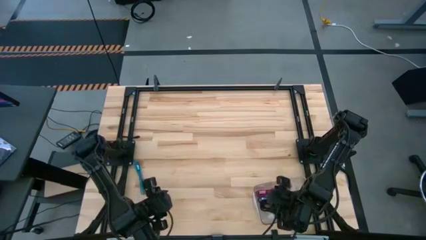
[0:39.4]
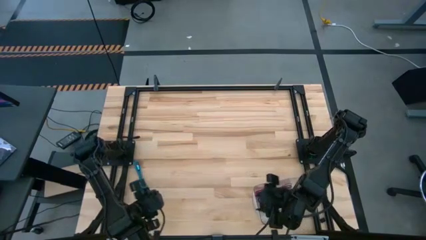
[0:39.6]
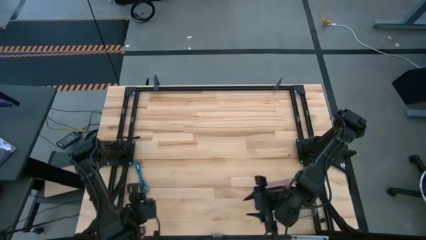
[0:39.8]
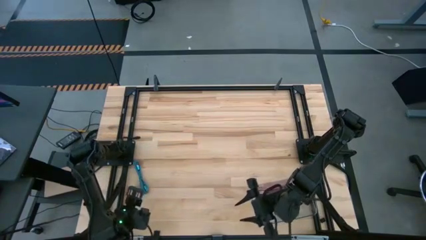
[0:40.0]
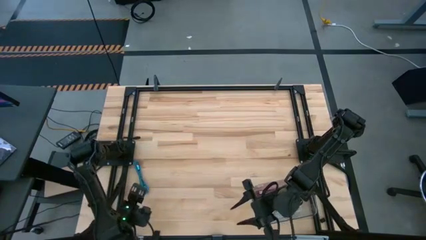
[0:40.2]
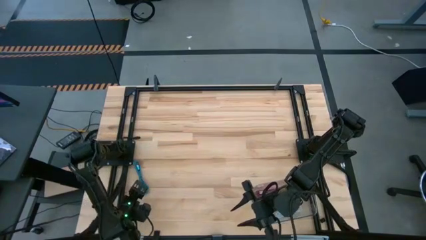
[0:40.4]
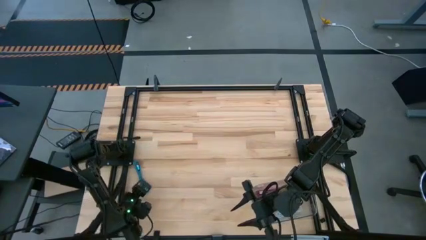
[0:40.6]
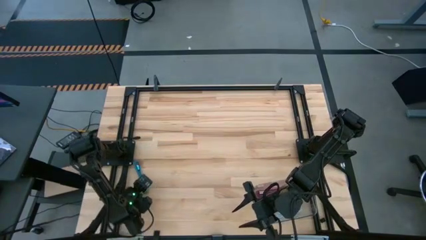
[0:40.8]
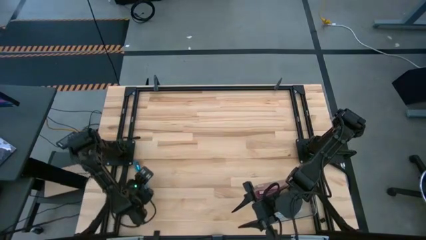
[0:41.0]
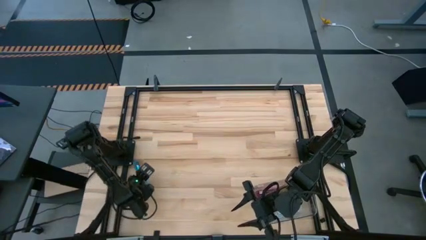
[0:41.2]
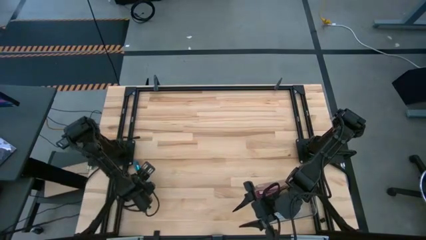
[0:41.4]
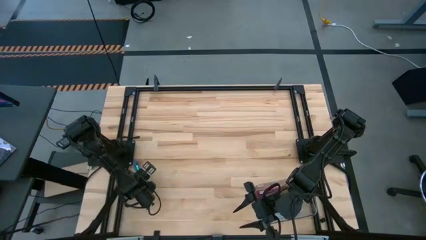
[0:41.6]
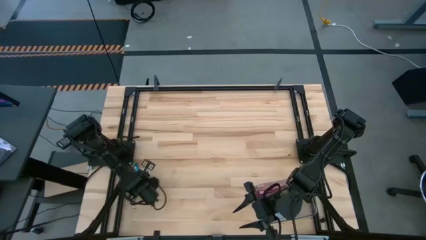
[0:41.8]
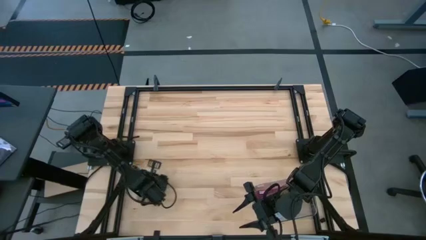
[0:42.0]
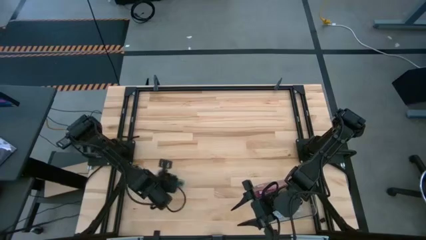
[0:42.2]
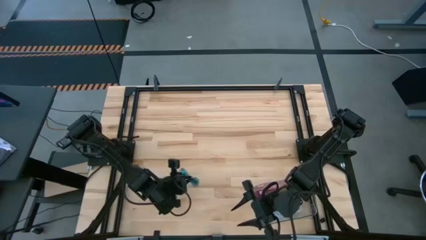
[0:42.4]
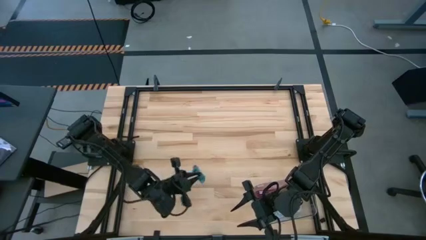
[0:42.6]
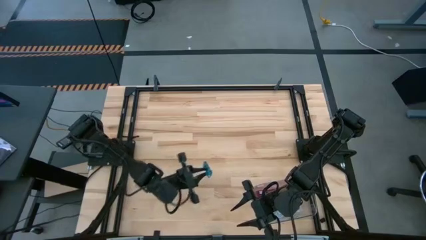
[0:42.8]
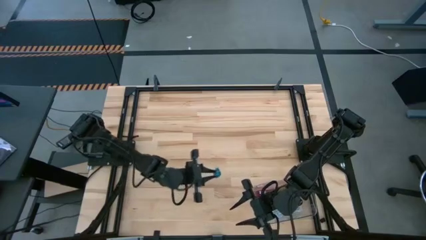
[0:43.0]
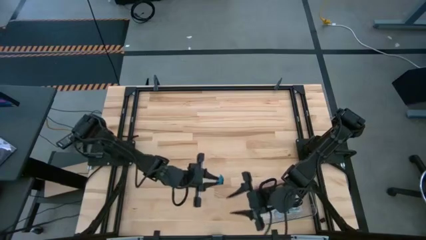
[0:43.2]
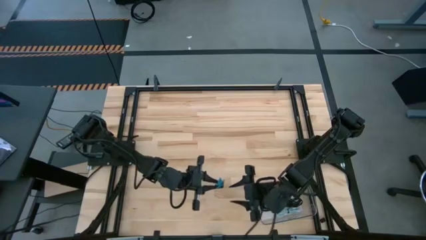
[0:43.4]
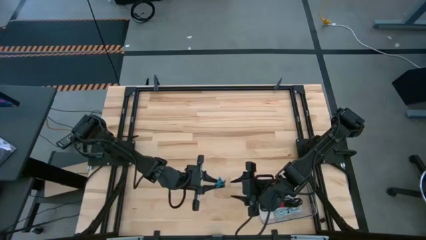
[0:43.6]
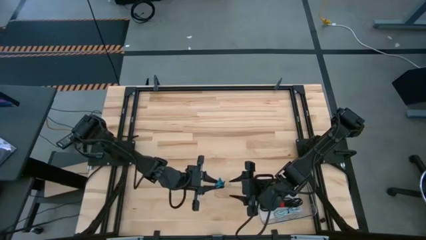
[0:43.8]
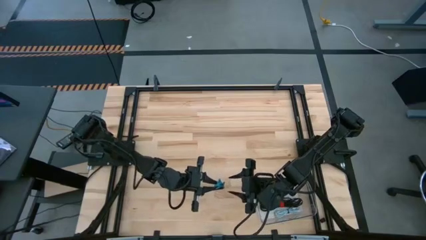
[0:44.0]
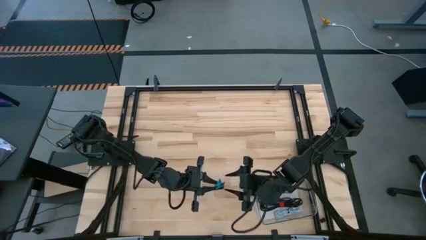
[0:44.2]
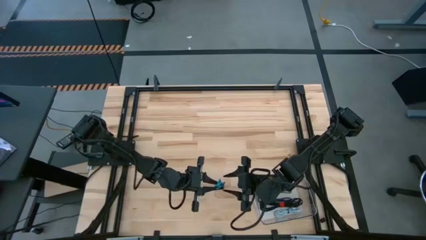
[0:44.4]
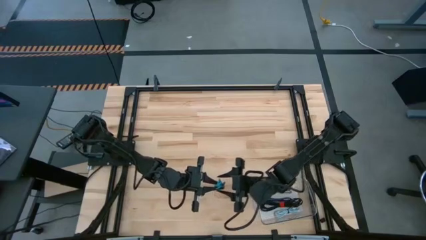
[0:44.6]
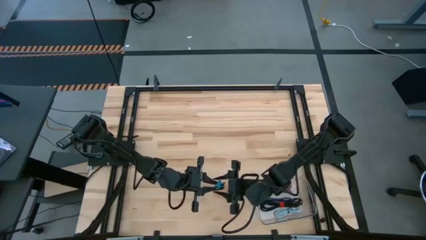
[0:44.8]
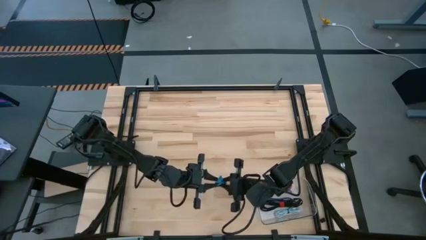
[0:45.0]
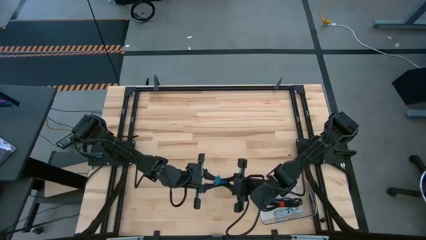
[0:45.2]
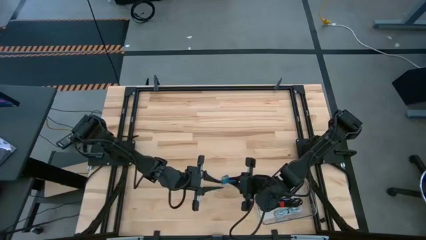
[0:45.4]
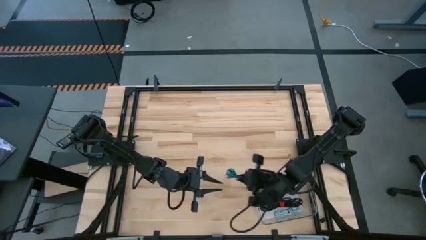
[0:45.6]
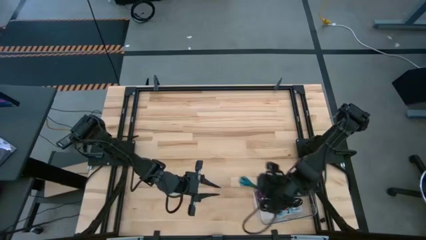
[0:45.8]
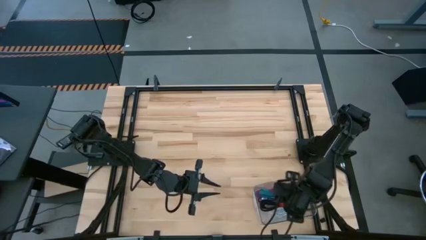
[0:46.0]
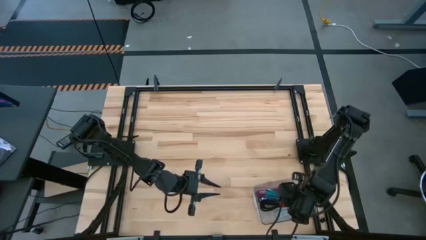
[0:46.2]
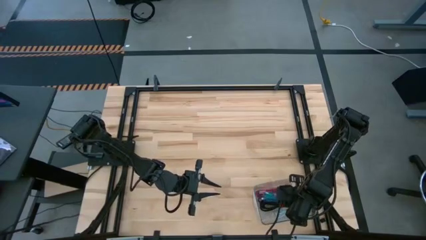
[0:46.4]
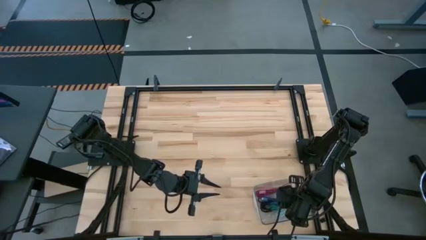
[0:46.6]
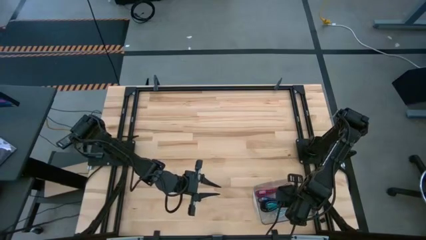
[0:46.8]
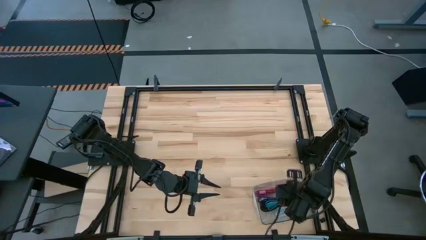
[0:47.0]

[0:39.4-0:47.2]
Task: Pick and place USB-C Cables
Put the blue USB cable into the transparent bin

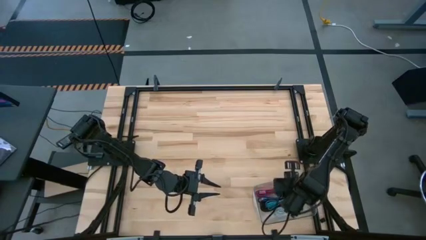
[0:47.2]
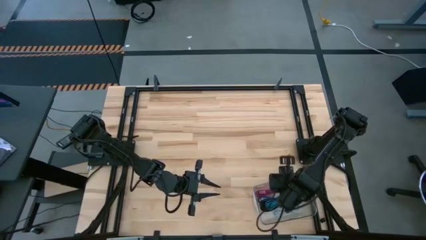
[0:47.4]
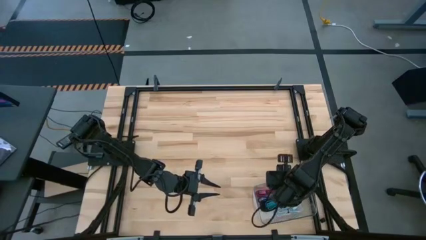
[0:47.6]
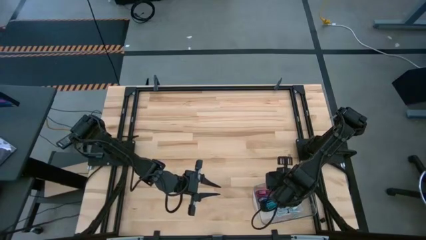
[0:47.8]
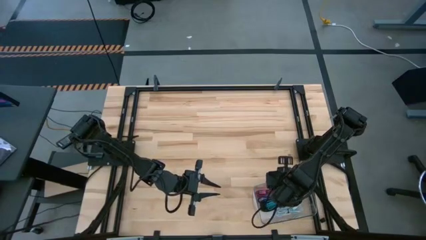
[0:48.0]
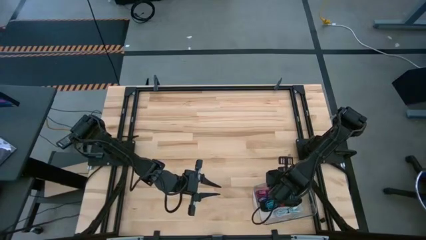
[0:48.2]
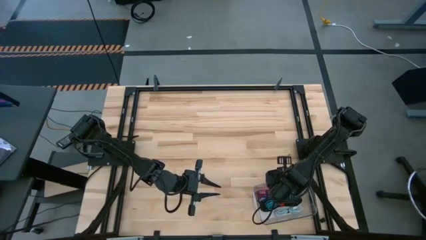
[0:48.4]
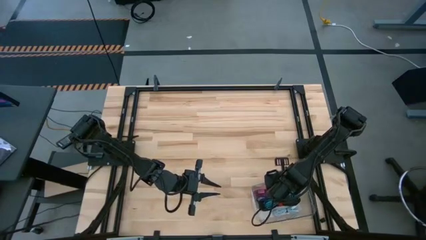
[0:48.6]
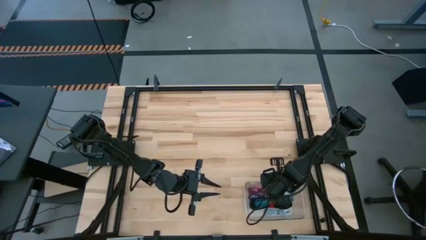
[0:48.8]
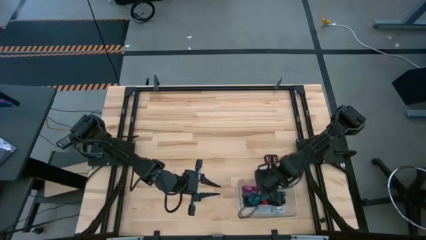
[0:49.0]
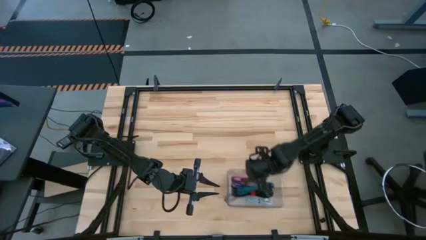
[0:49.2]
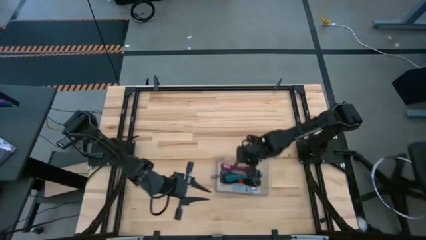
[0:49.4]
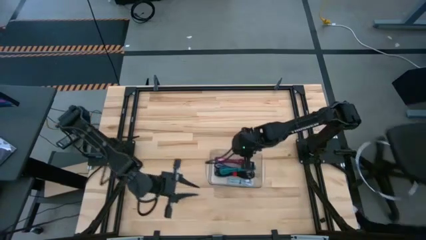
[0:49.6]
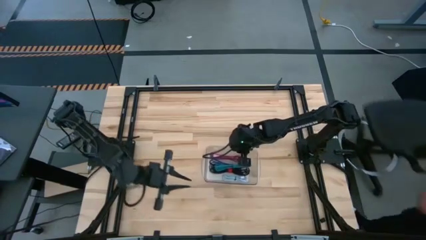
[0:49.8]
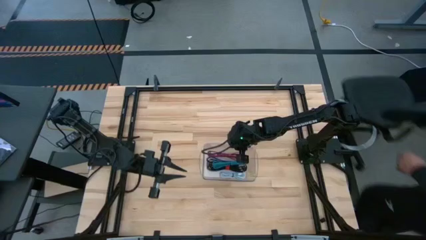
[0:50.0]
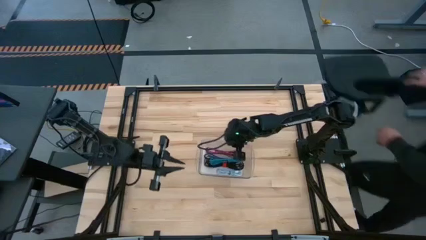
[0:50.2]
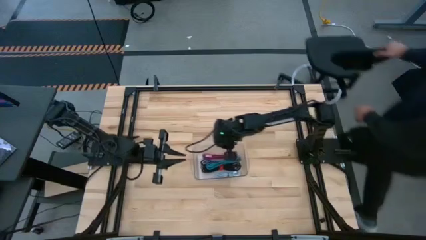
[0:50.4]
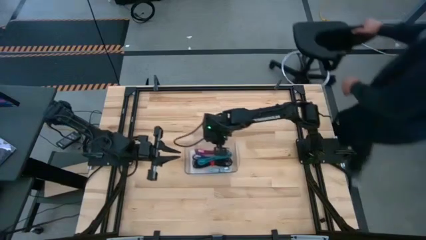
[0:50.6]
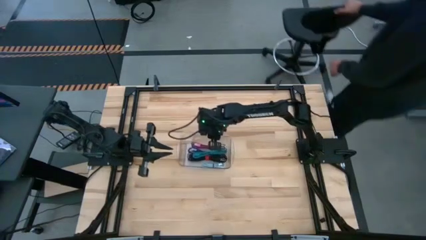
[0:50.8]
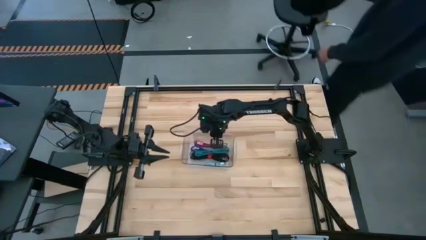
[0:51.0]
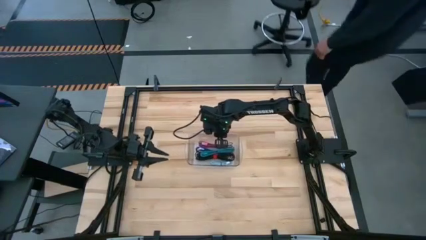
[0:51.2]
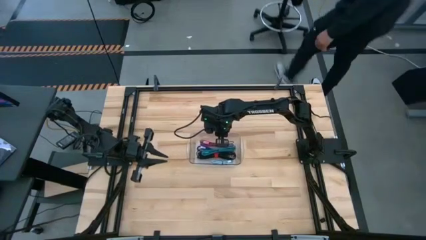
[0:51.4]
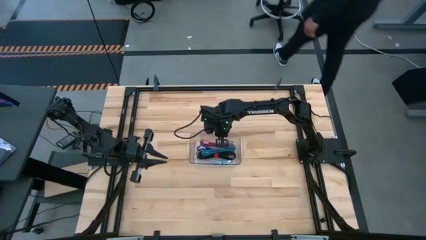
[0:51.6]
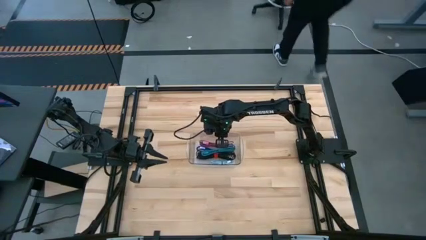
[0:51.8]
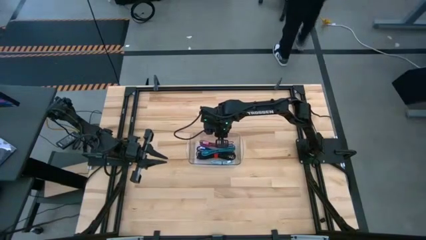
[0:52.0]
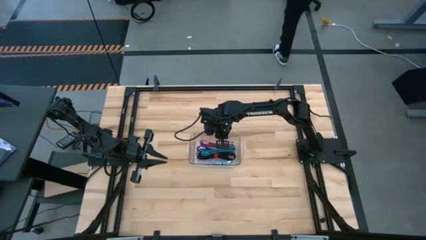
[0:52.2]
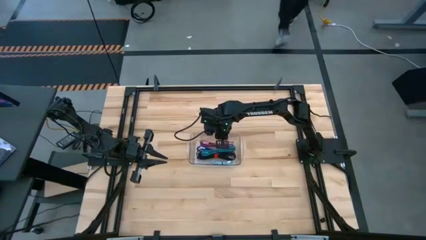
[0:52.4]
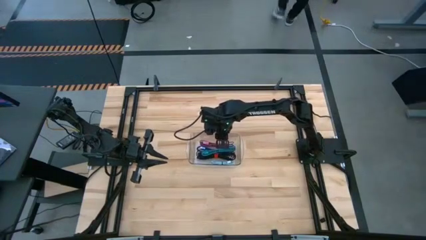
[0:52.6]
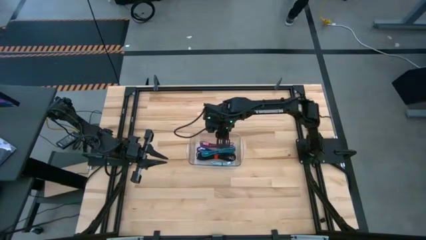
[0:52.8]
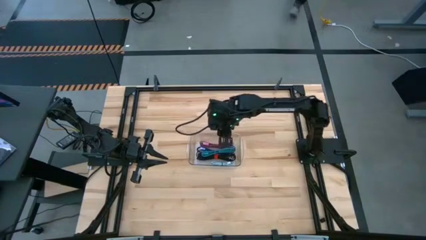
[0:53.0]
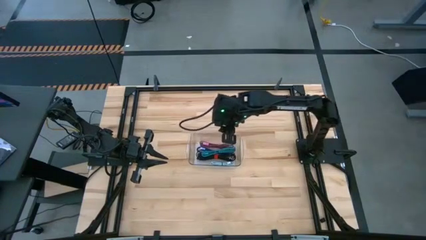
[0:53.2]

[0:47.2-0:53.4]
Move the transparent bin to the center of the table

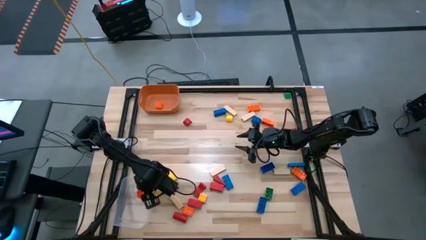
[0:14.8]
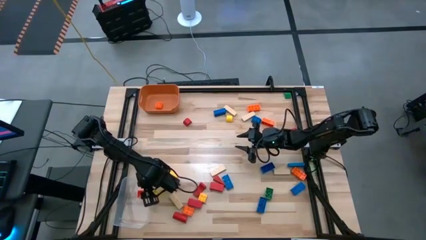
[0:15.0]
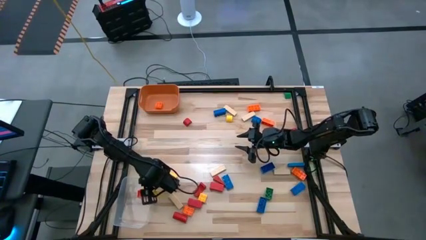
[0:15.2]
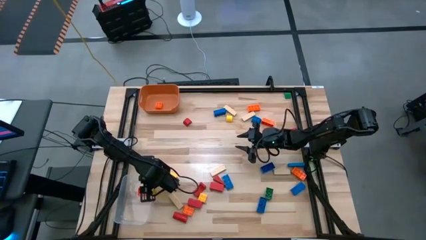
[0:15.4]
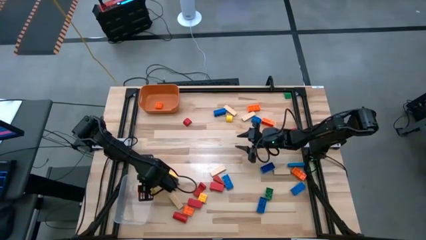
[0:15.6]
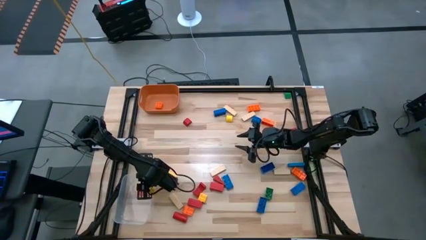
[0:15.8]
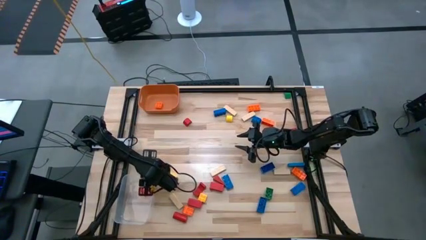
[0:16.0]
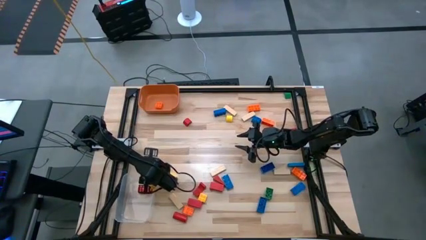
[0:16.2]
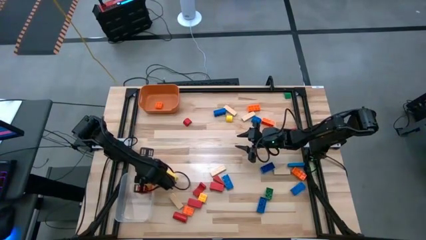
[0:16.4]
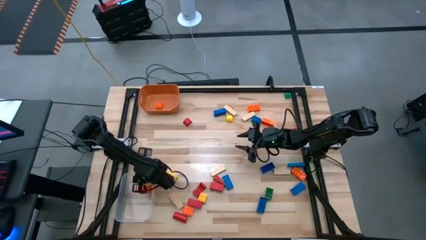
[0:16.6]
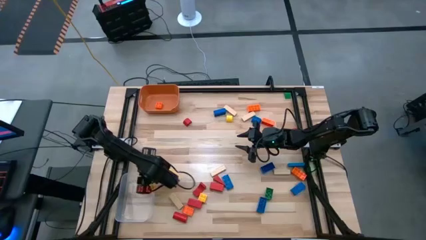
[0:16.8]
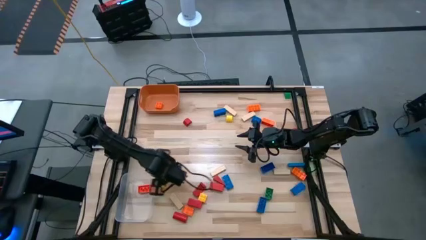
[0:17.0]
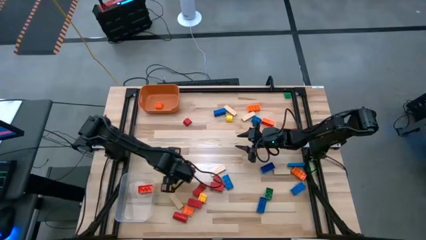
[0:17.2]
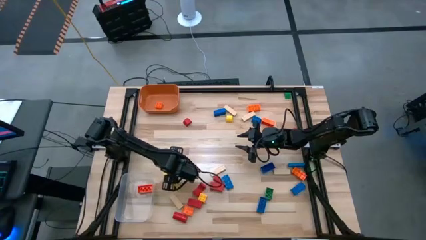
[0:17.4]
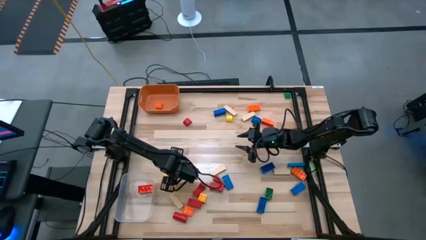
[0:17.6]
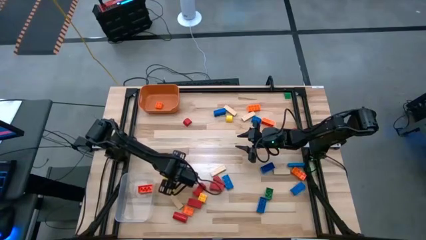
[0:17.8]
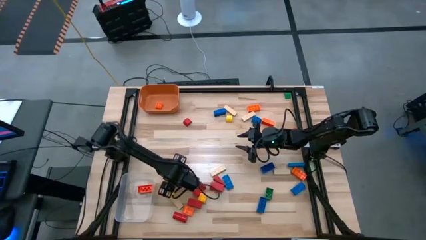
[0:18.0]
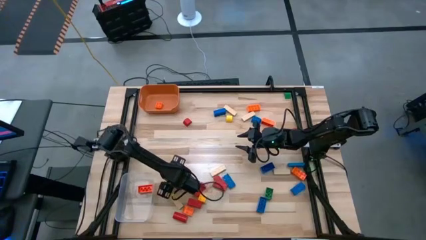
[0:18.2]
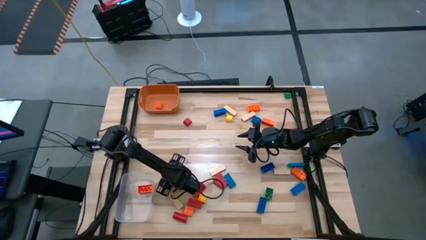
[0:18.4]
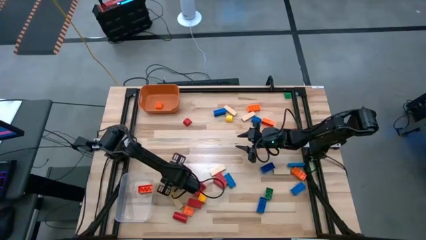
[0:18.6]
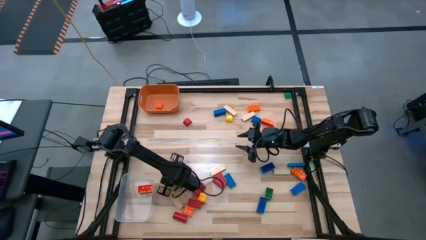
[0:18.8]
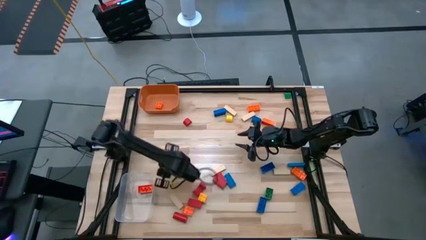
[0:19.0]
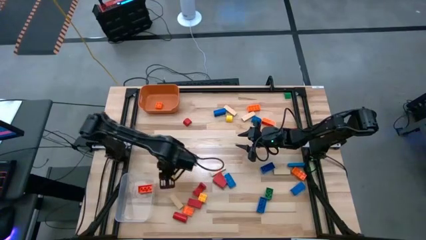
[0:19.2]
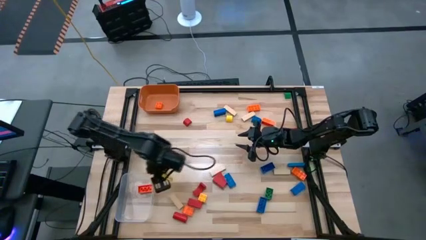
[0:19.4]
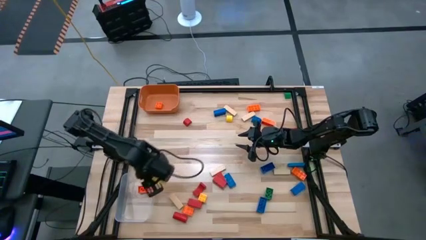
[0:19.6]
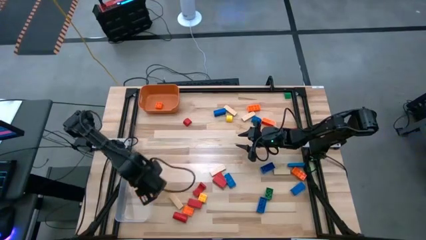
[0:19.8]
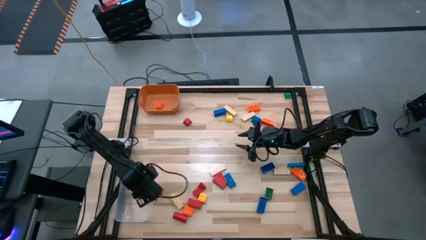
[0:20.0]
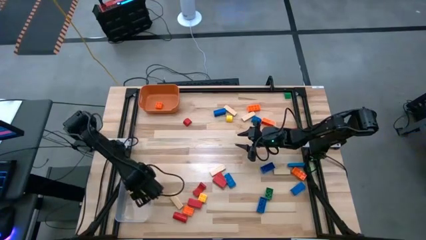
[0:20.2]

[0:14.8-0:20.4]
Task: Sort blocks by size
Put the large yellow block into the transparent bin
